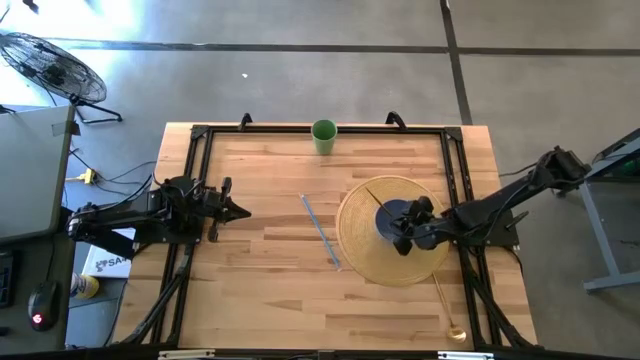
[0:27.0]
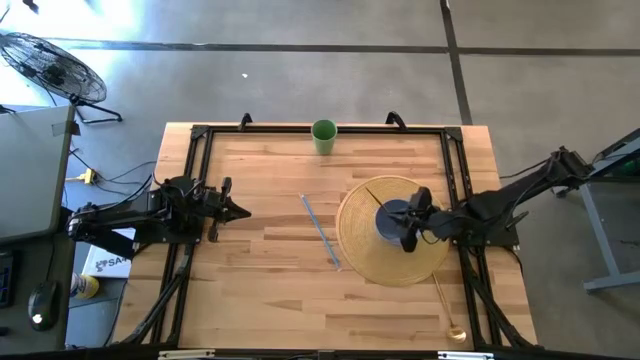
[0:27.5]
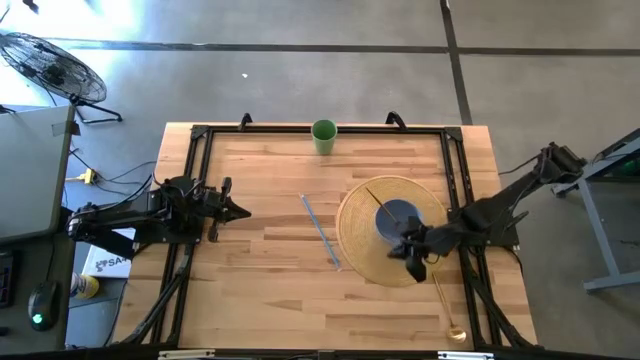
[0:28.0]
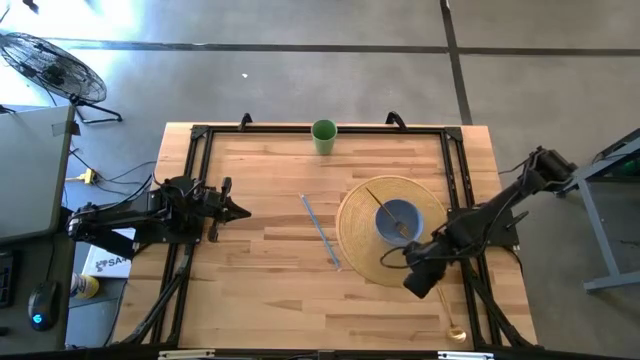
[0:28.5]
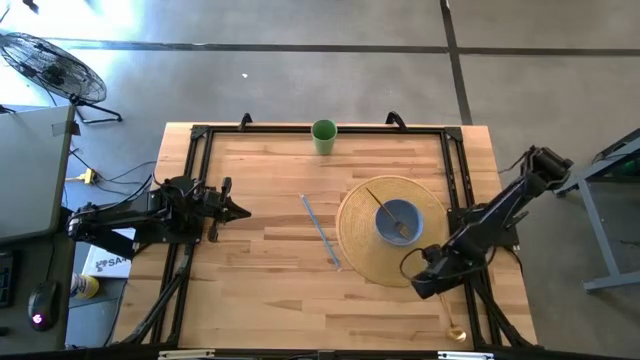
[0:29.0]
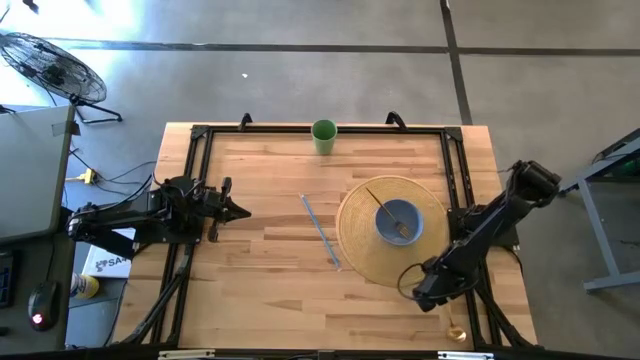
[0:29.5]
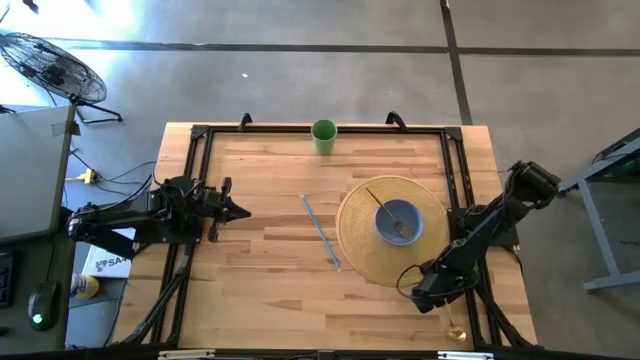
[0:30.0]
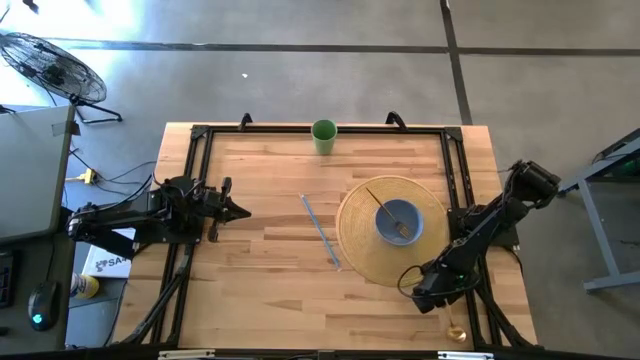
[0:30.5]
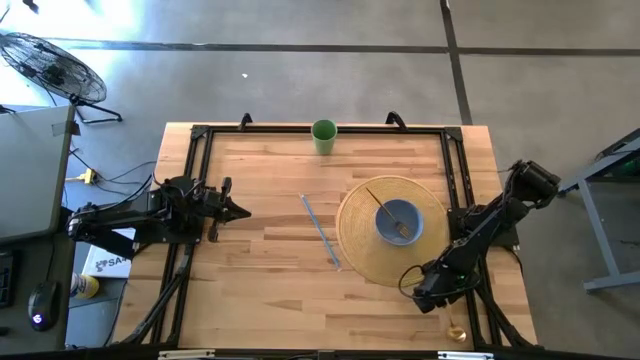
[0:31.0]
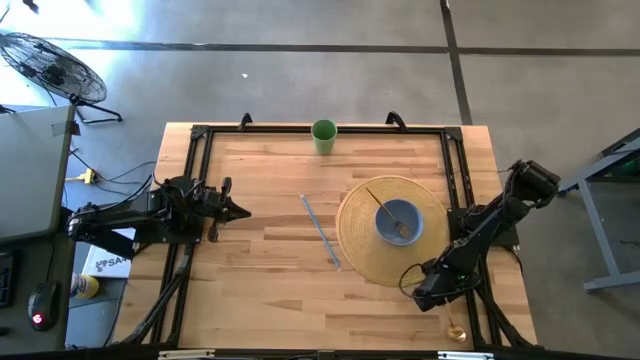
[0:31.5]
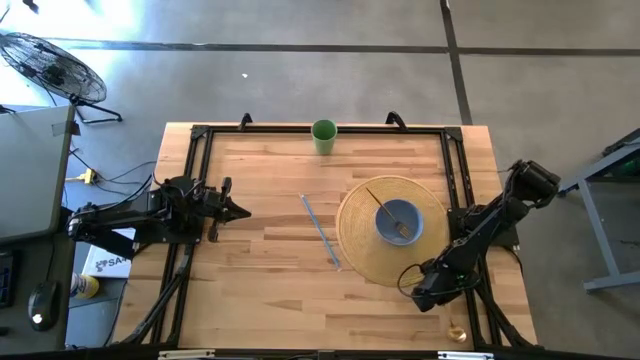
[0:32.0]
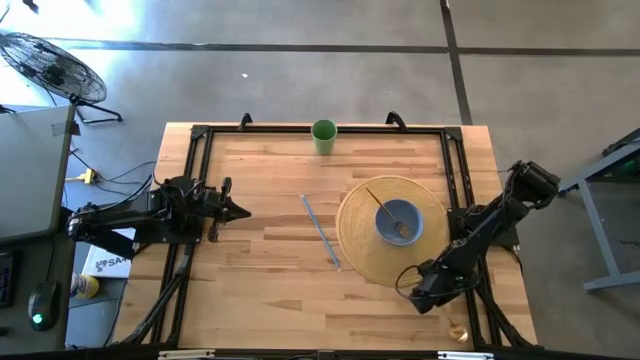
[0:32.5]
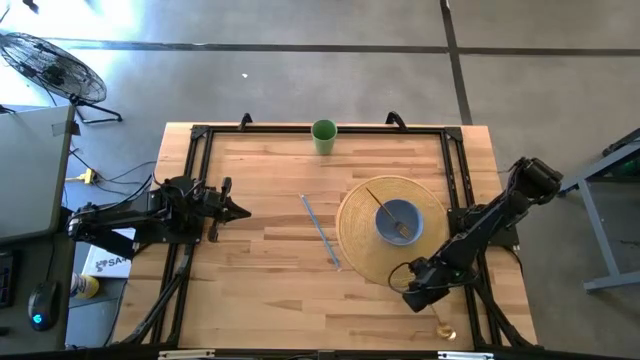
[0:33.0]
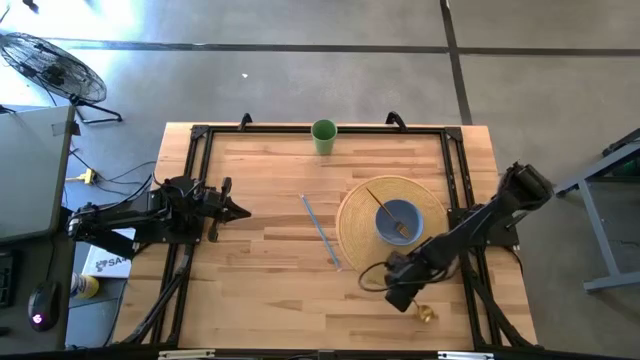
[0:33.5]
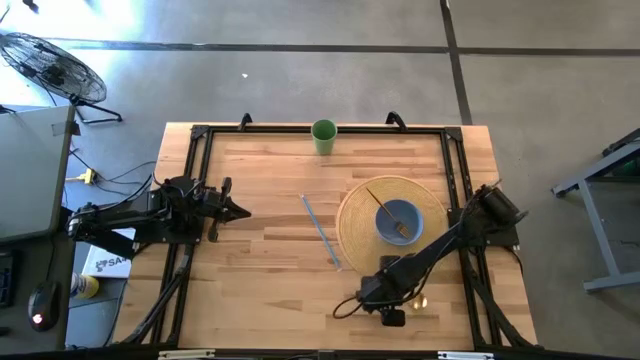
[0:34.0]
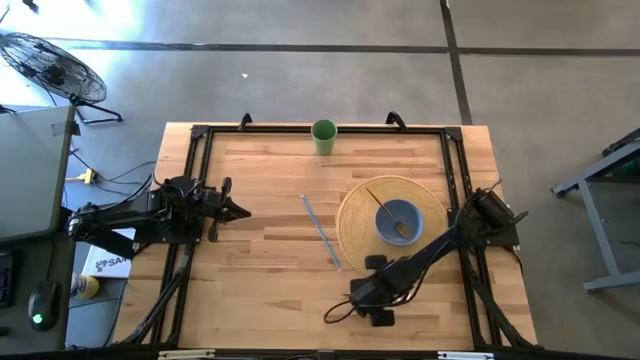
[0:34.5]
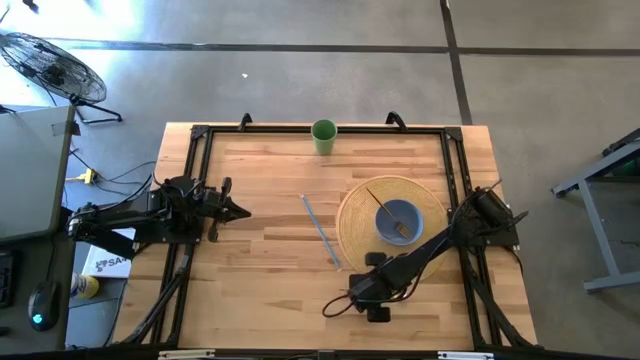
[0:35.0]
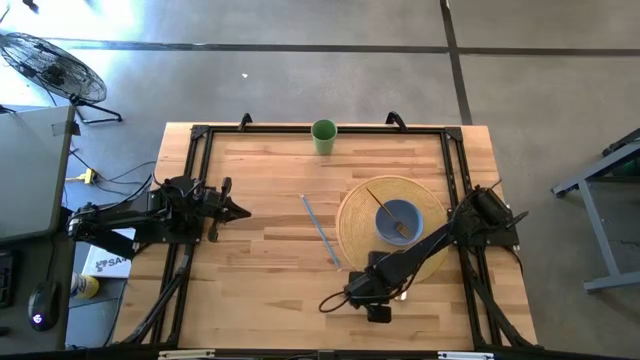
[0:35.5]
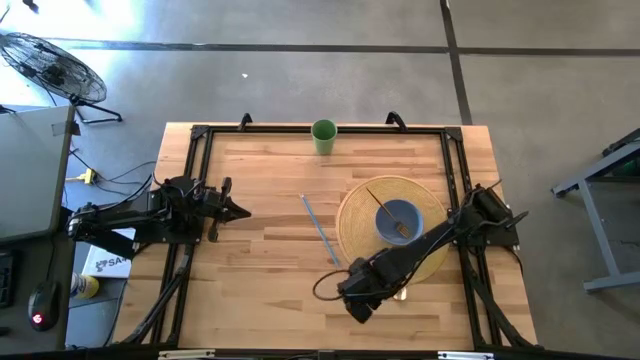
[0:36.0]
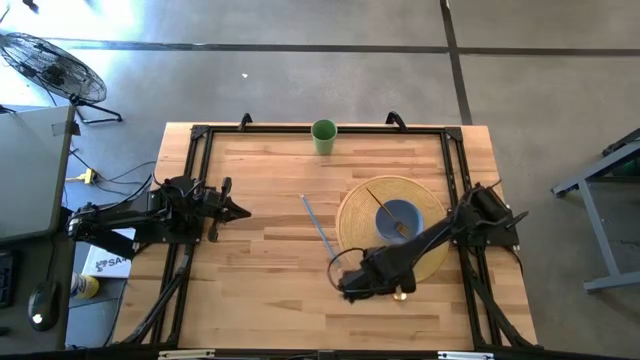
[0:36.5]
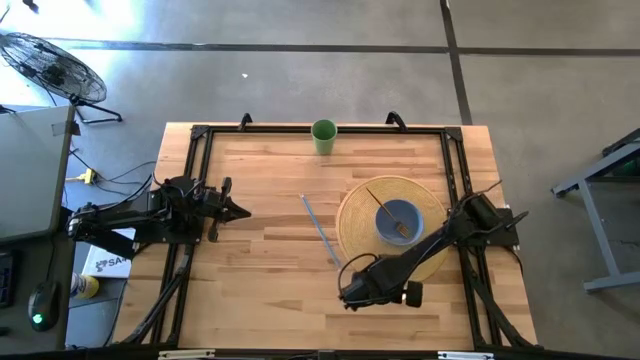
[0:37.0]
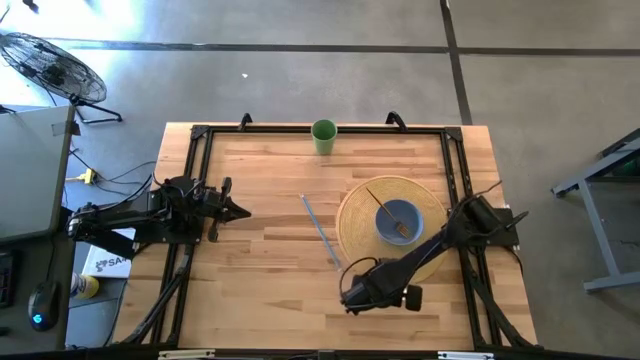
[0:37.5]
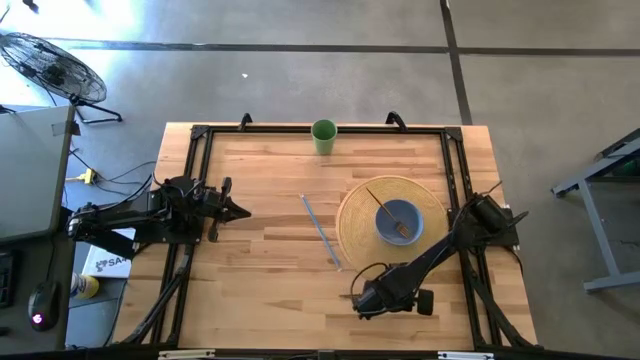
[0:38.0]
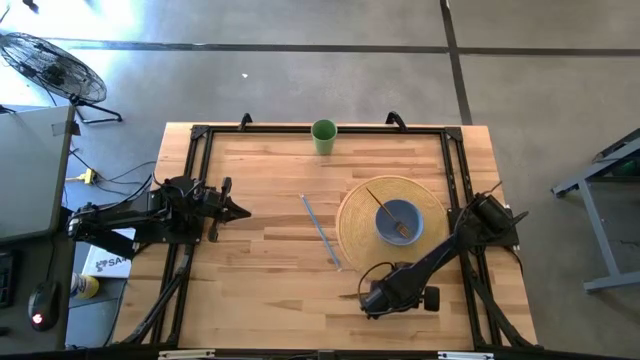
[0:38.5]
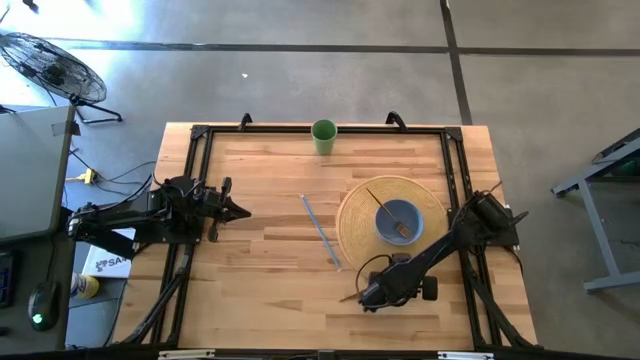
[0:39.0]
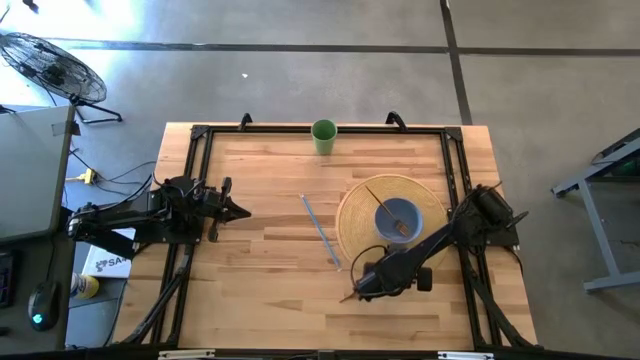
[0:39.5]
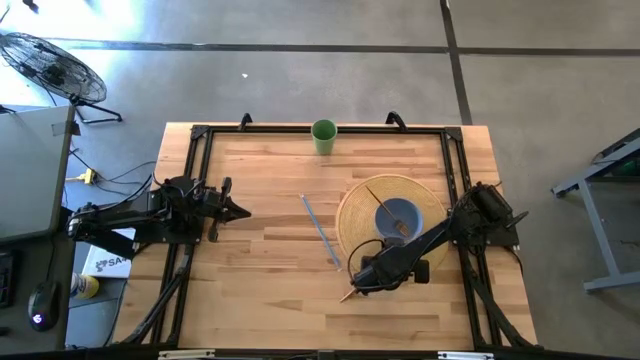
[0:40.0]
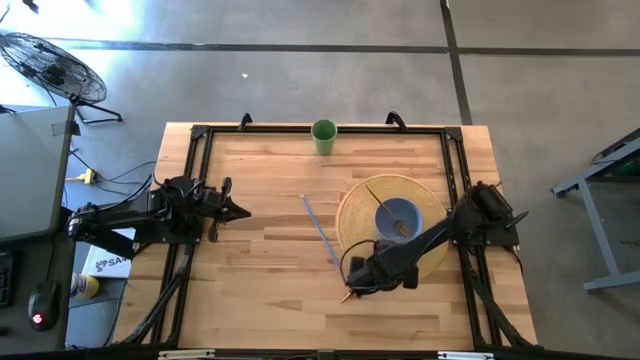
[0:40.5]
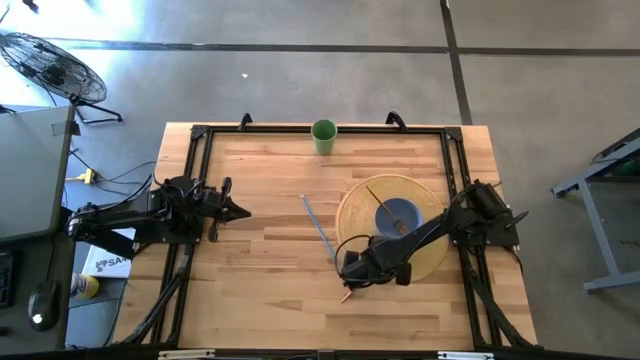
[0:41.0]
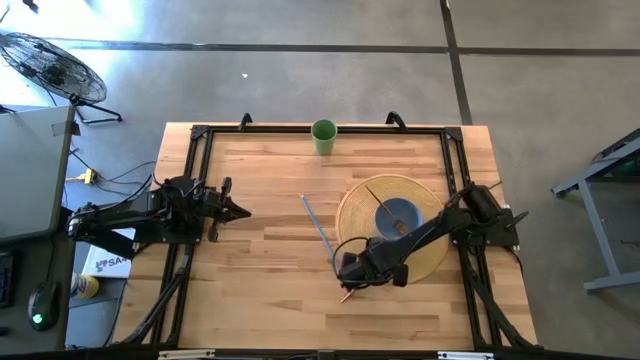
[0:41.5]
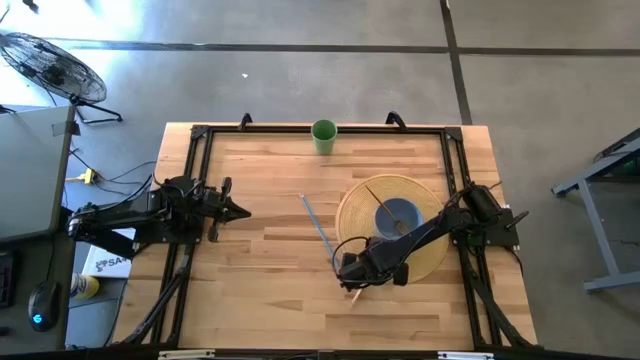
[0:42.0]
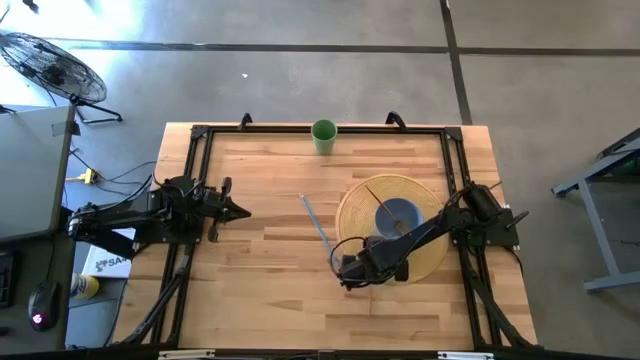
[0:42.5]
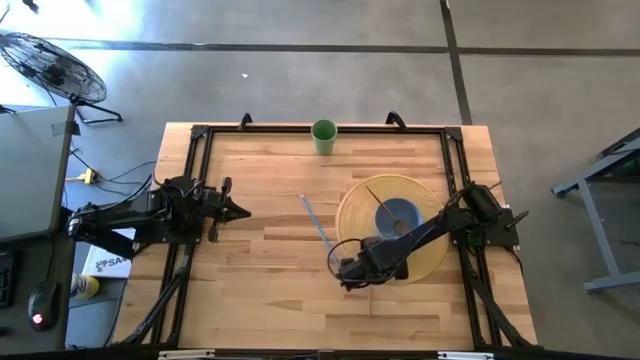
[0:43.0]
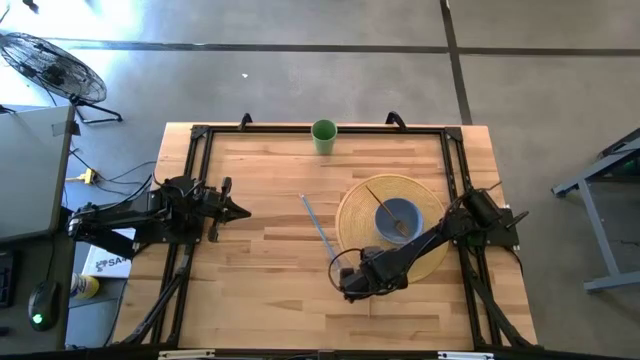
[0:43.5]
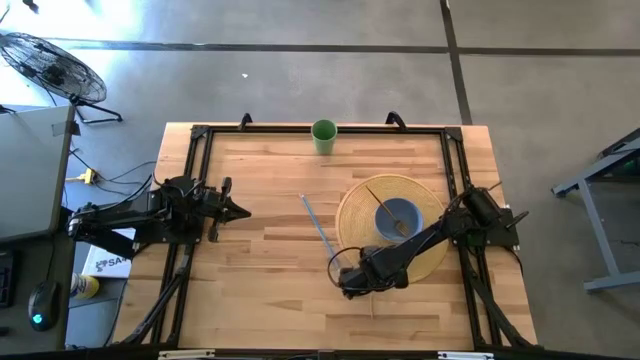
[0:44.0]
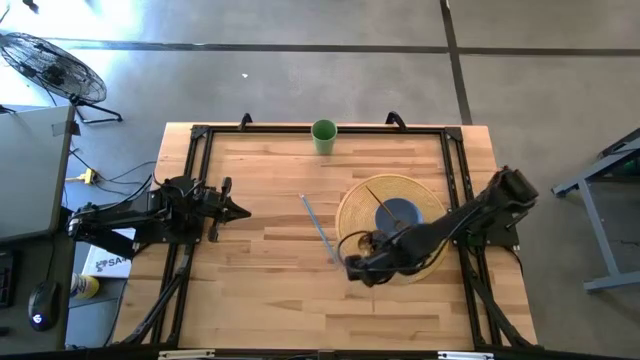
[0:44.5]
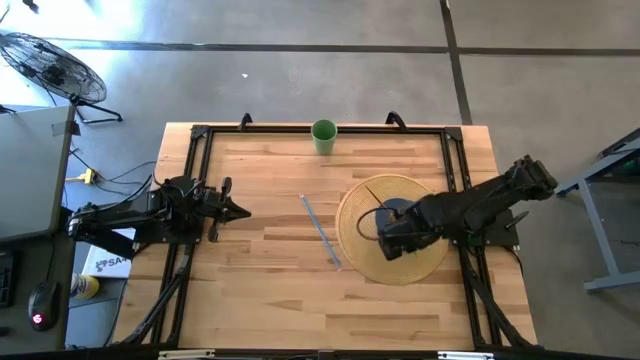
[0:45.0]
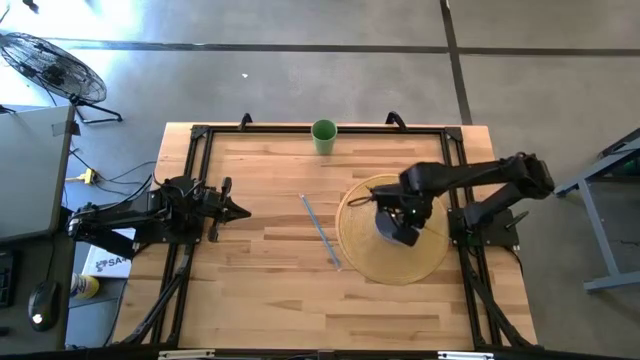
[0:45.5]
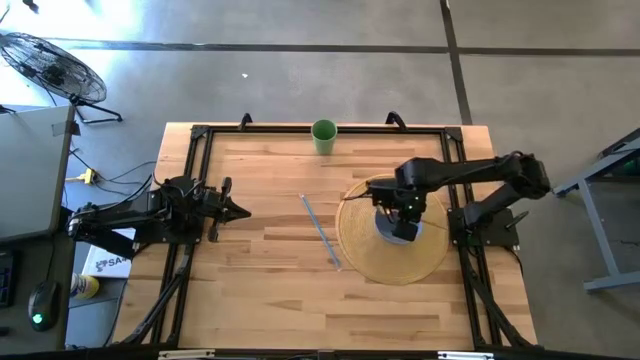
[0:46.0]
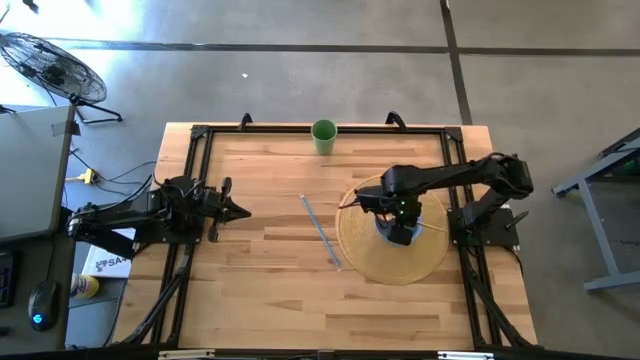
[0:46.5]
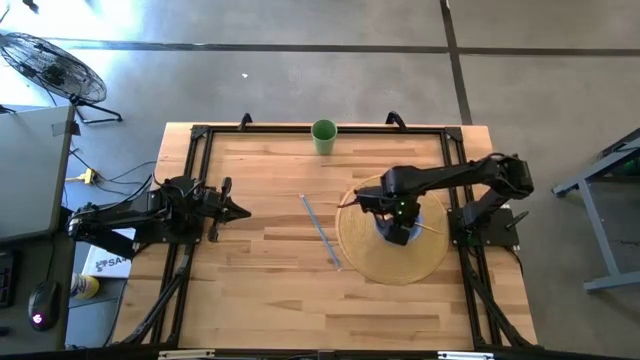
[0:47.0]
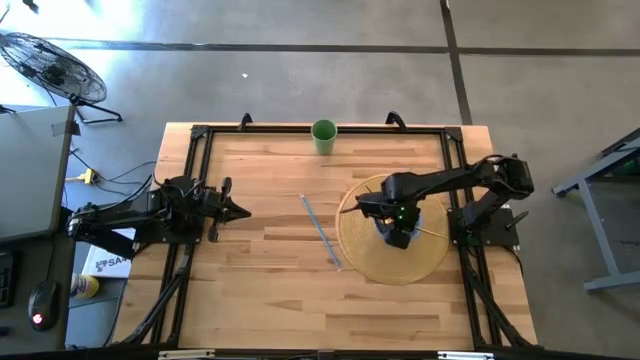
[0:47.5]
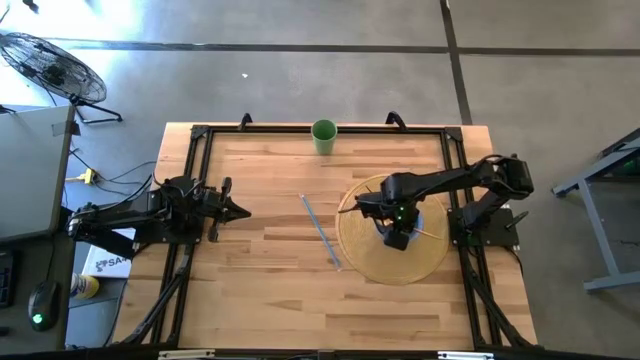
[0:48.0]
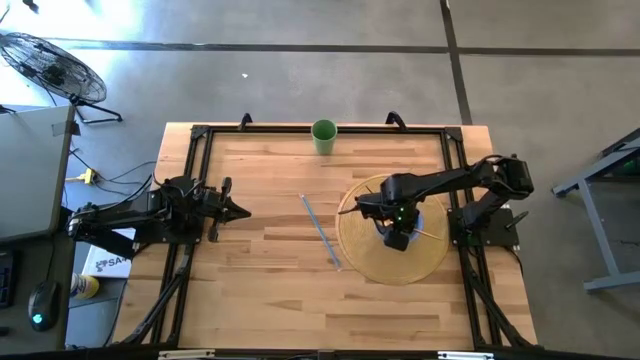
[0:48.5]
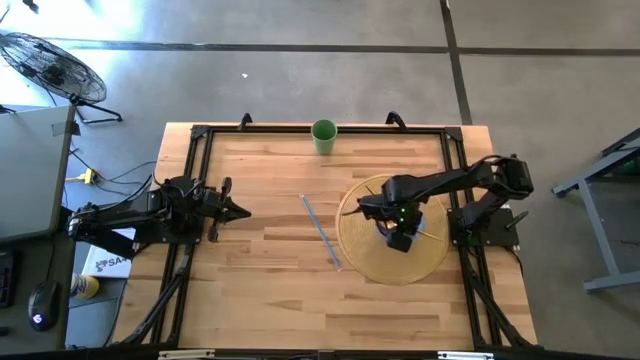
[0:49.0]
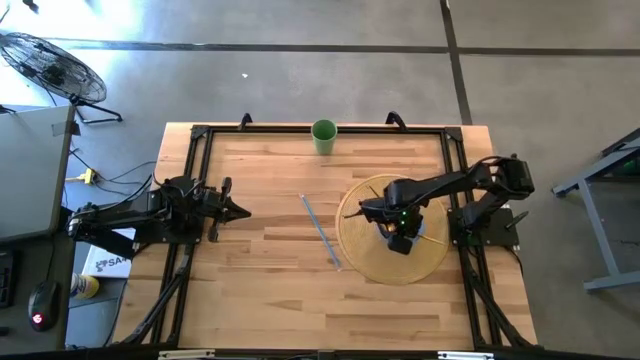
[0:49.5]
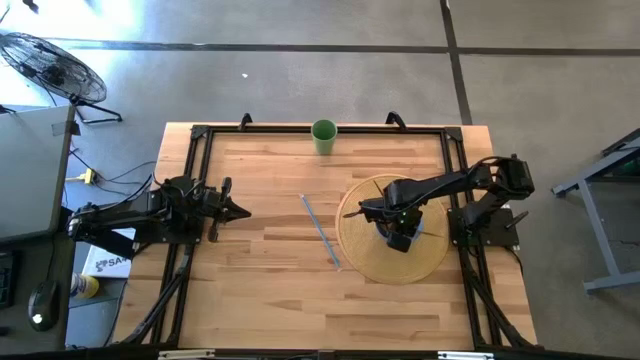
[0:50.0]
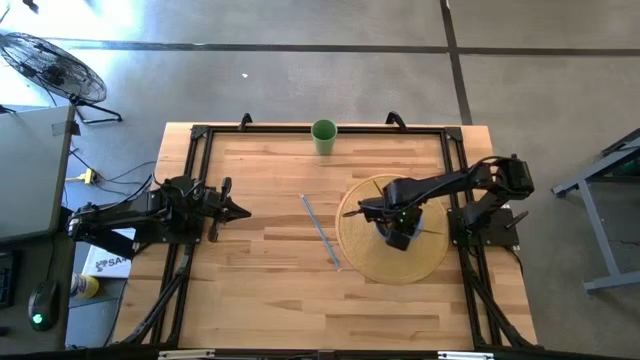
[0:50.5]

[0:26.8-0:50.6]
Task: Pick & Place Utensil
Put the gold spoon into the blue bowl on the brown mat
